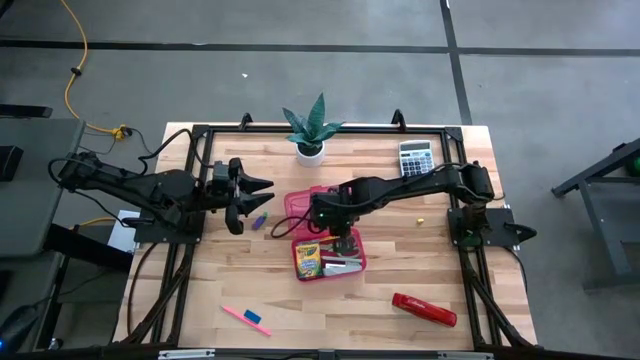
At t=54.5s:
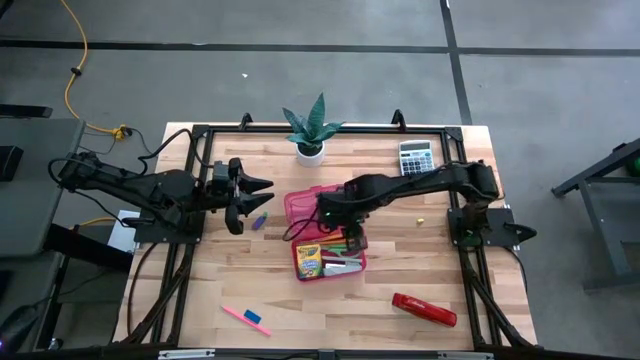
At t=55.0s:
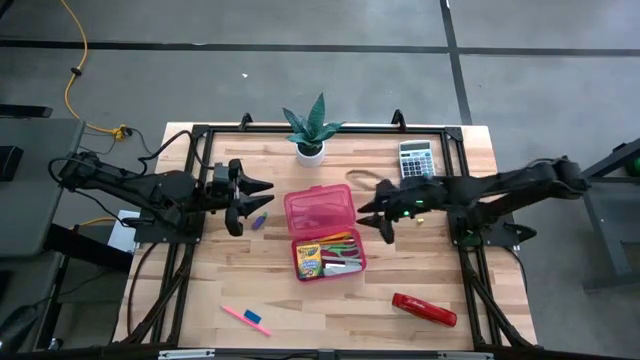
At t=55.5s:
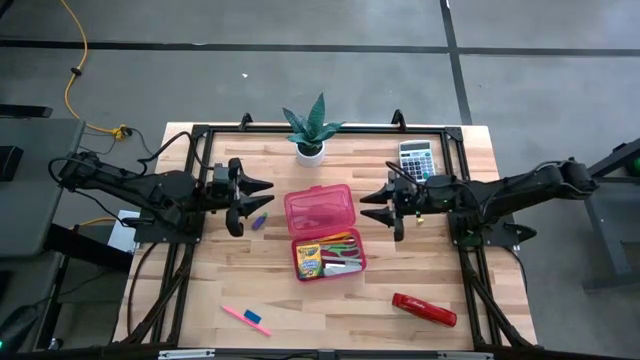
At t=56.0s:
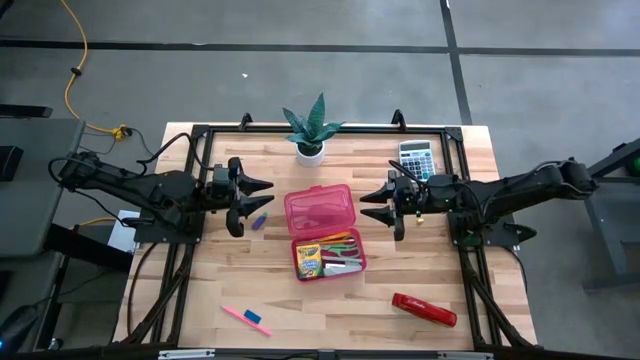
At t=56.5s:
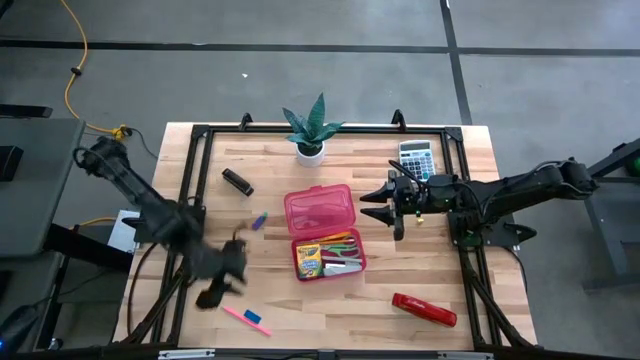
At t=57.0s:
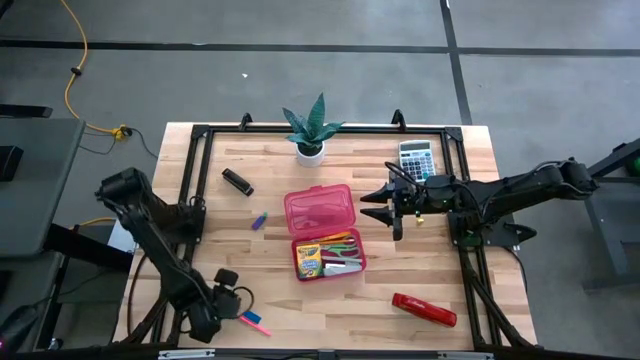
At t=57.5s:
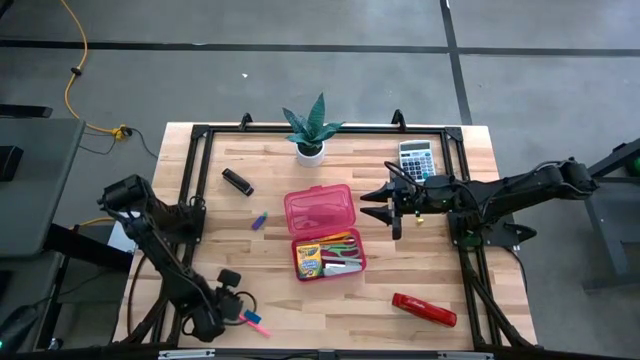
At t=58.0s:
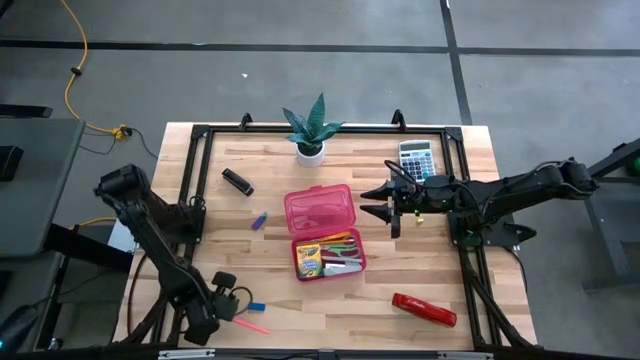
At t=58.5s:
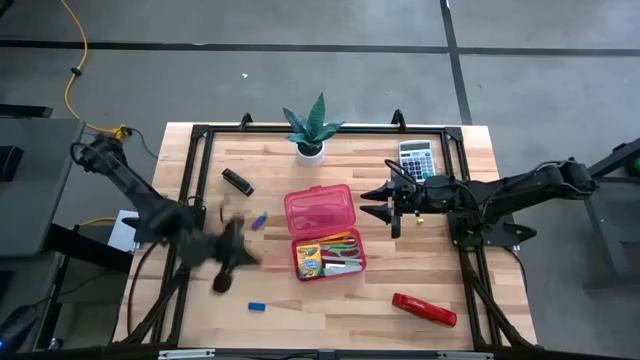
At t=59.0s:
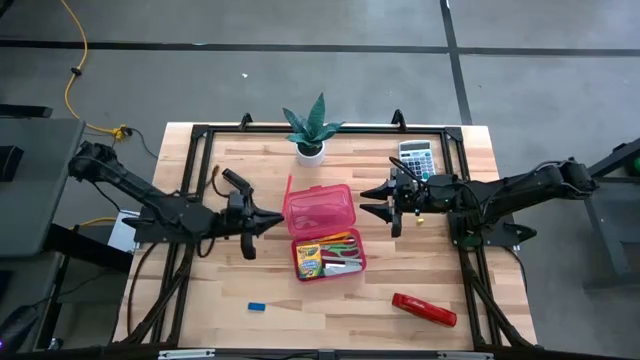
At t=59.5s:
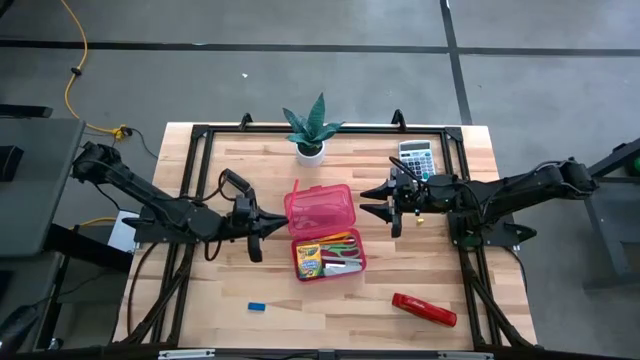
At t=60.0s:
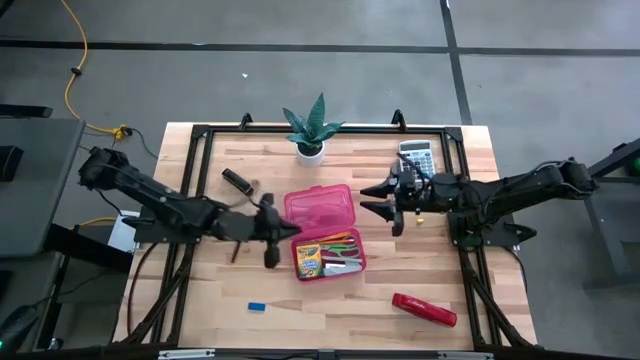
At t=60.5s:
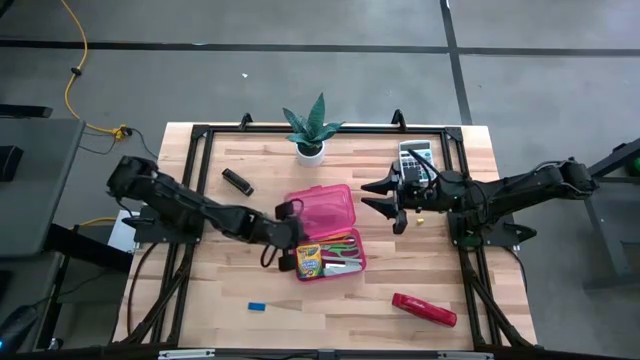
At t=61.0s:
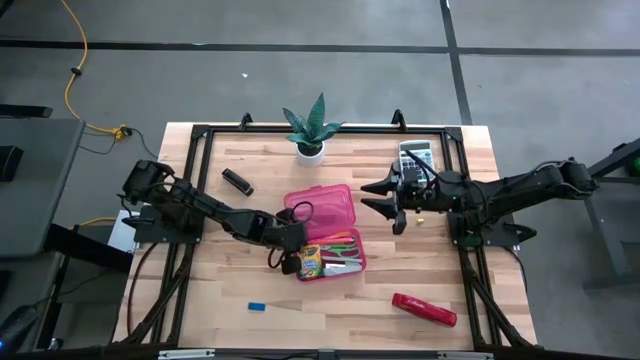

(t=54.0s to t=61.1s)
Task: Pack school essentials
Put the pink pencil into the red supply box

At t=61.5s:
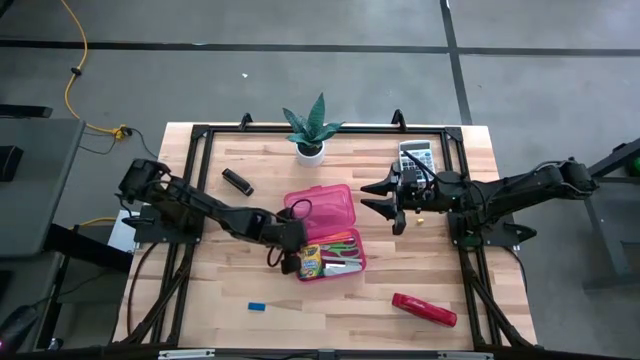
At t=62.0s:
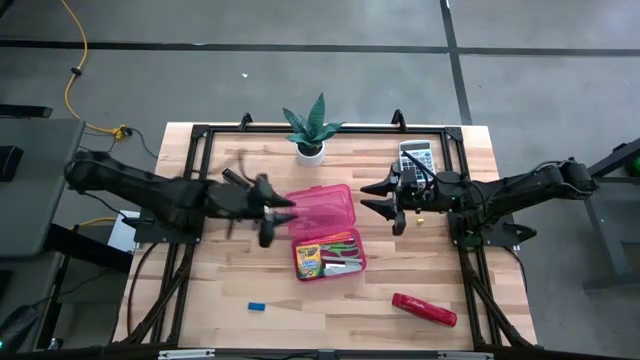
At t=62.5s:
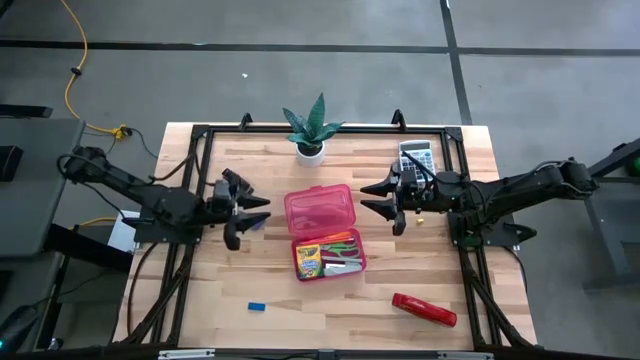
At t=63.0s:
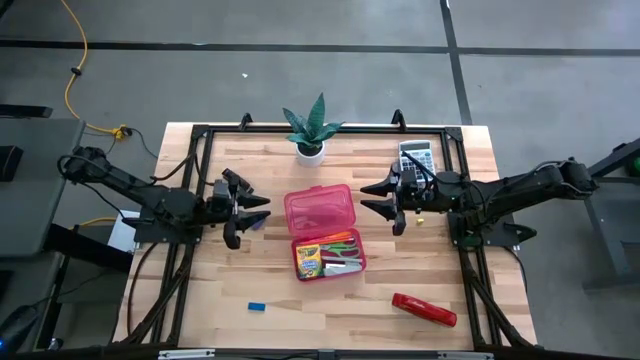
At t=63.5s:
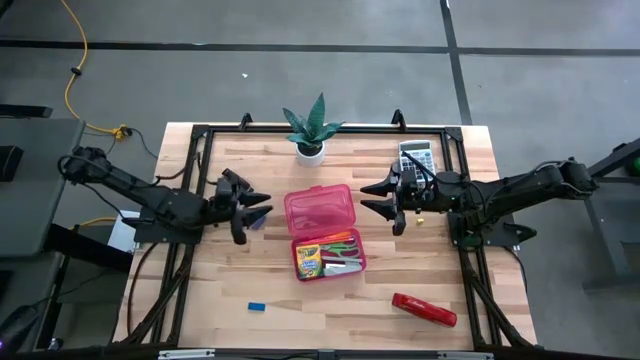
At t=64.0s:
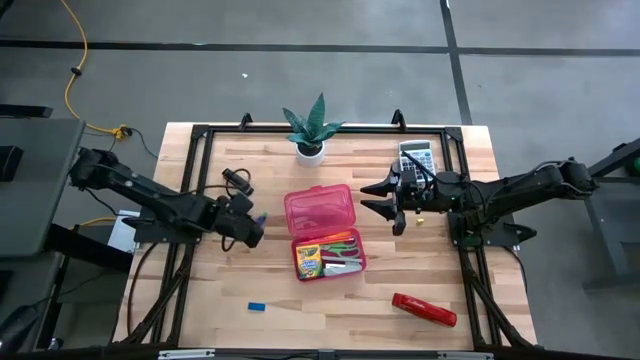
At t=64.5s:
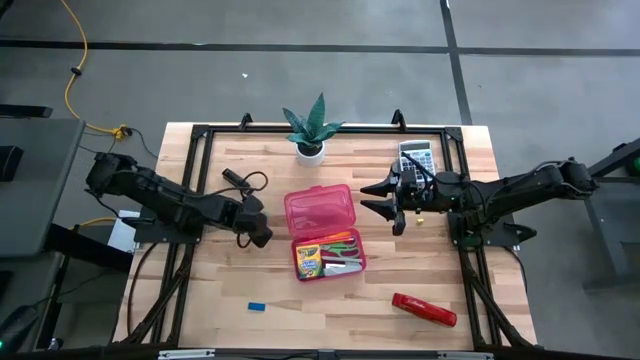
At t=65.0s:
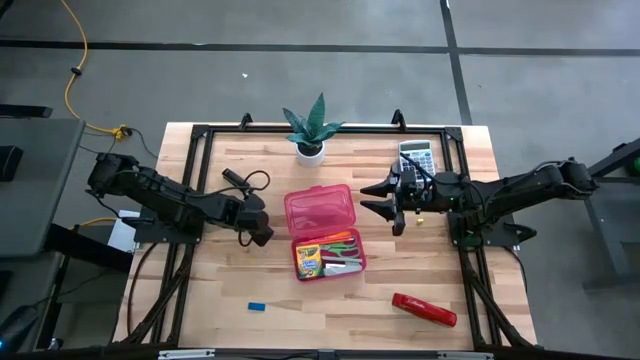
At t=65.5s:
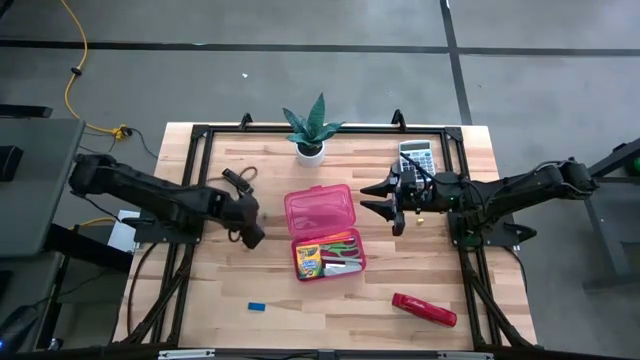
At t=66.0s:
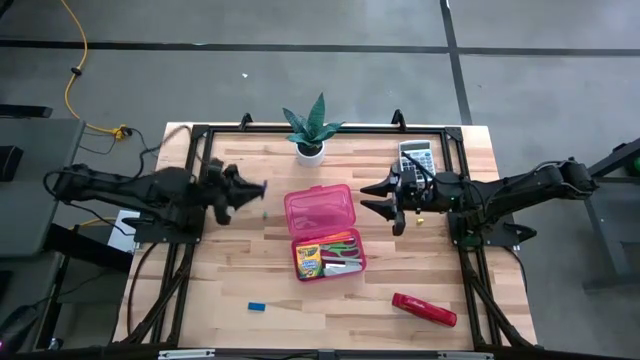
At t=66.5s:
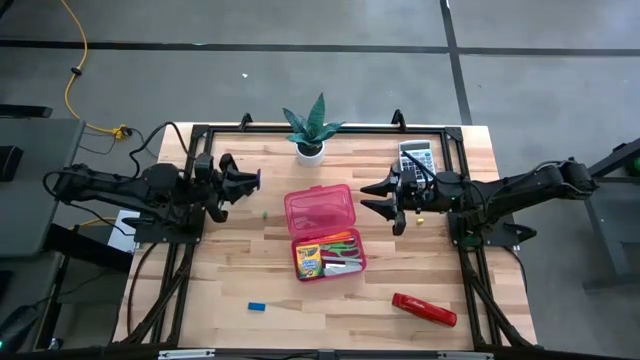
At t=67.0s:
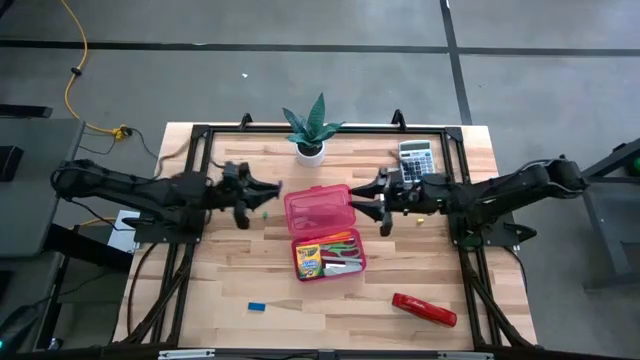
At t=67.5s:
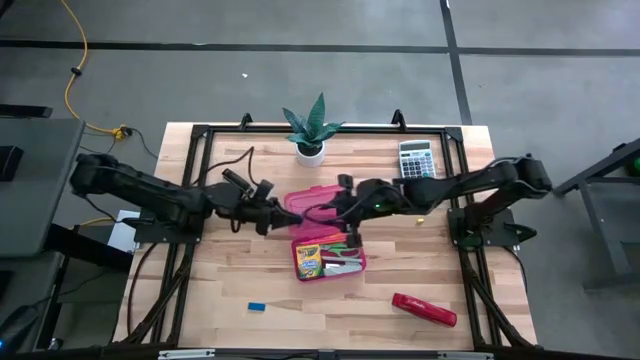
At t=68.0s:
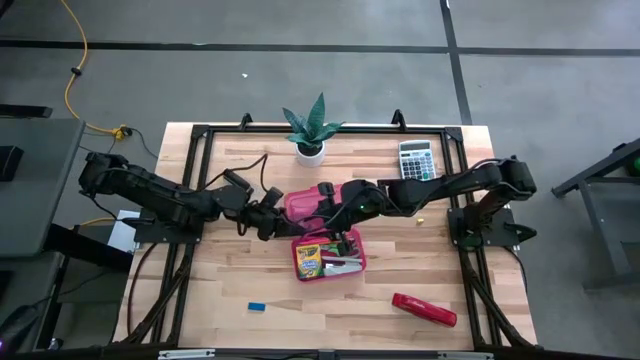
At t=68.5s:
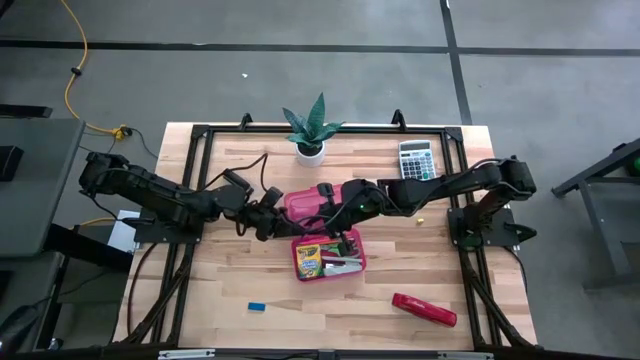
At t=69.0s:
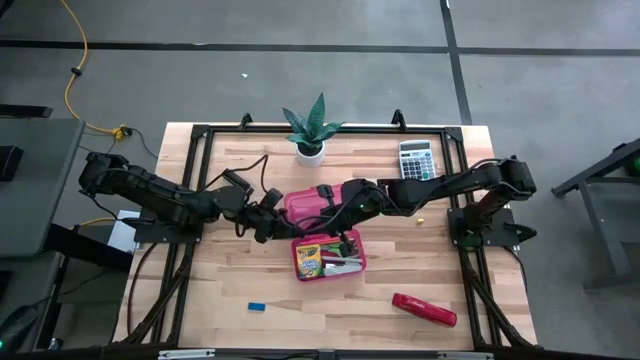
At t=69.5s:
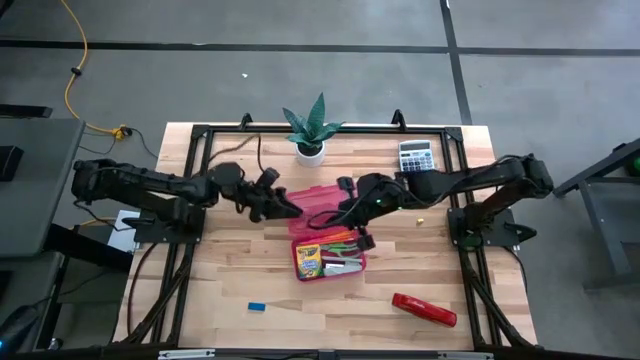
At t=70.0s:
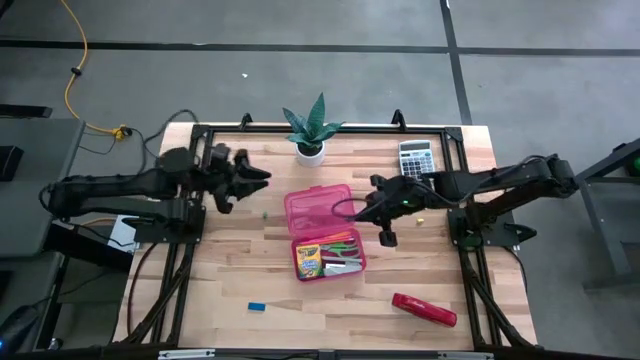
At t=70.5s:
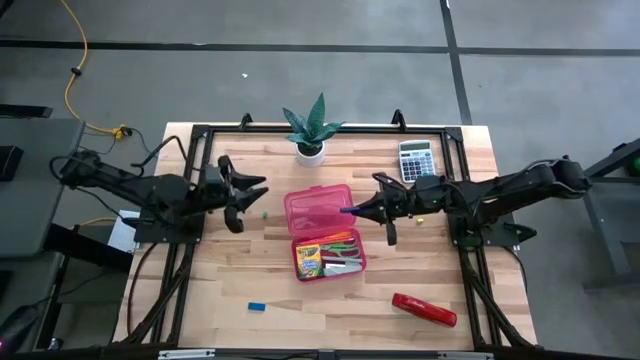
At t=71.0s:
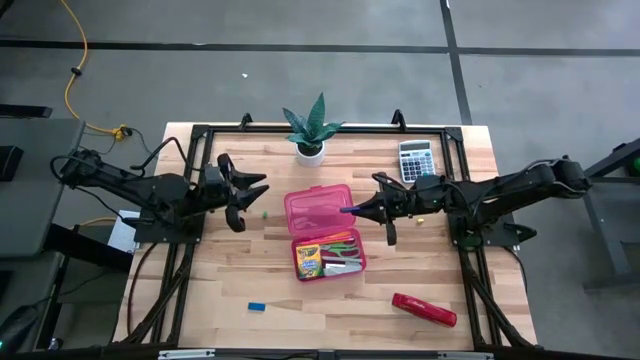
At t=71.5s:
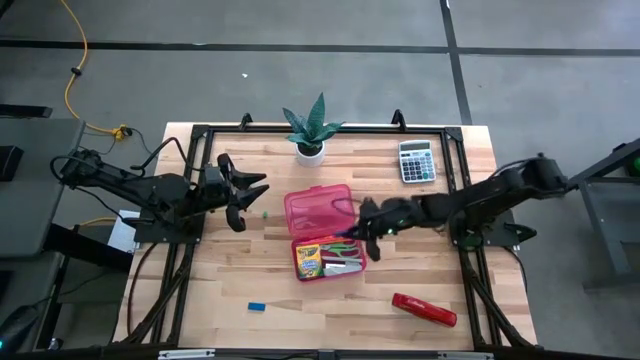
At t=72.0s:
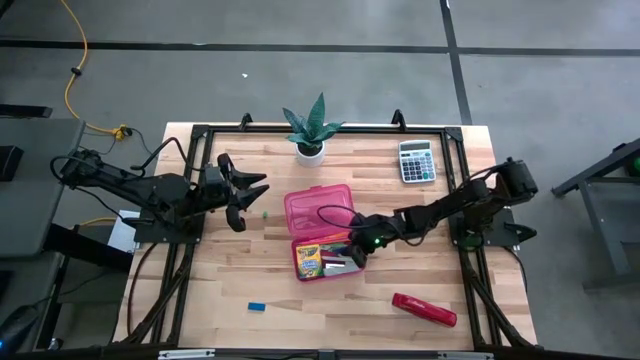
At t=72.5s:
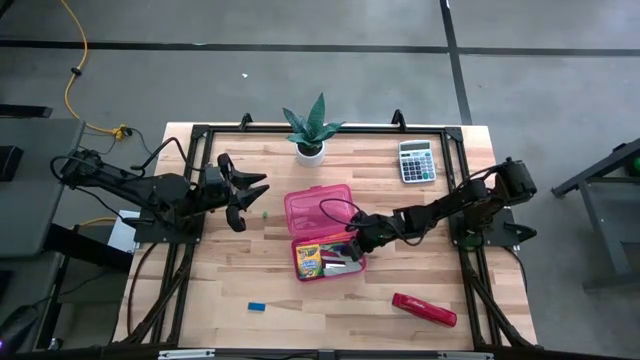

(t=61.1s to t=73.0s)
Put the violet eraser into the red supply box

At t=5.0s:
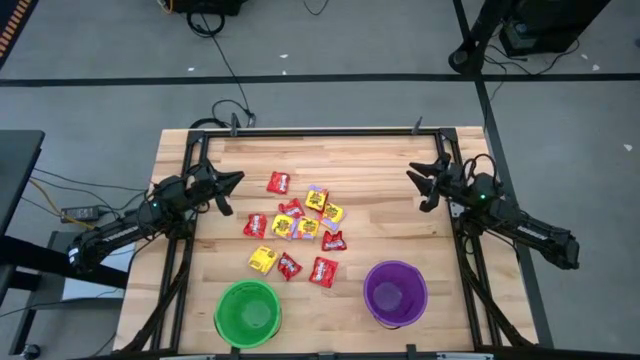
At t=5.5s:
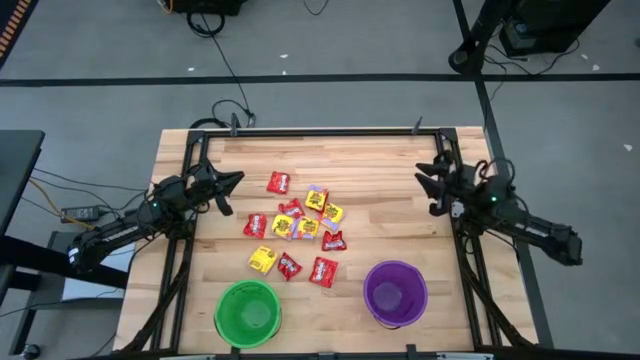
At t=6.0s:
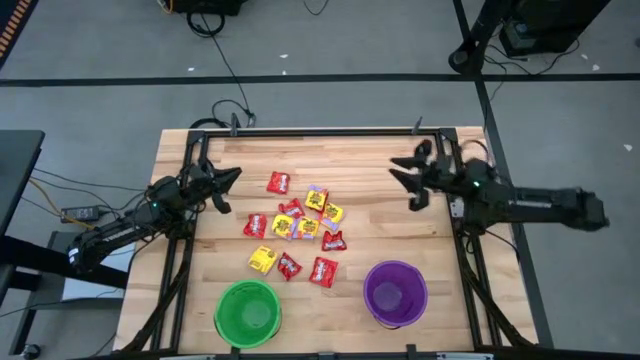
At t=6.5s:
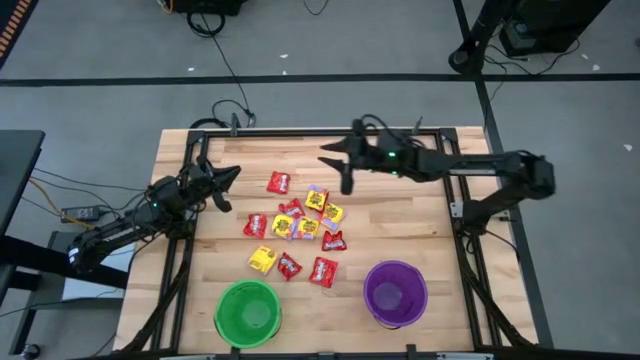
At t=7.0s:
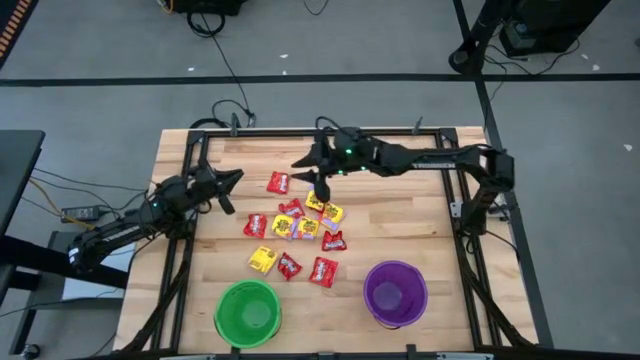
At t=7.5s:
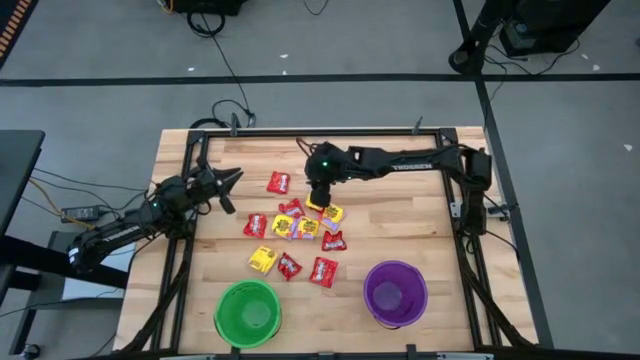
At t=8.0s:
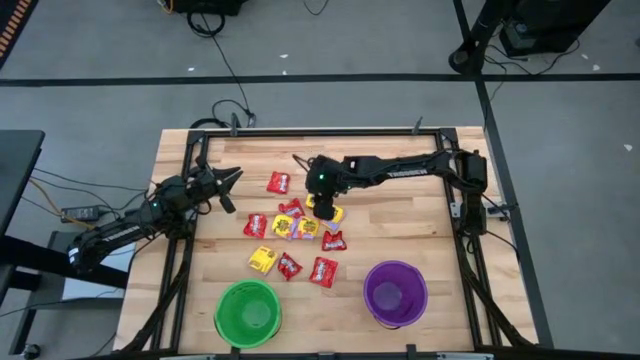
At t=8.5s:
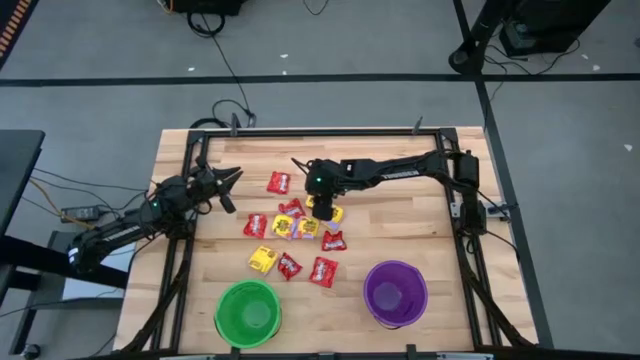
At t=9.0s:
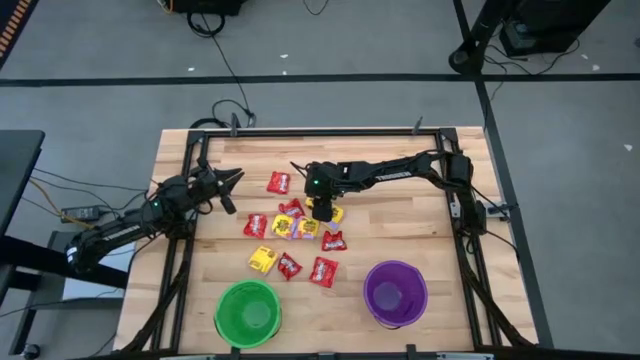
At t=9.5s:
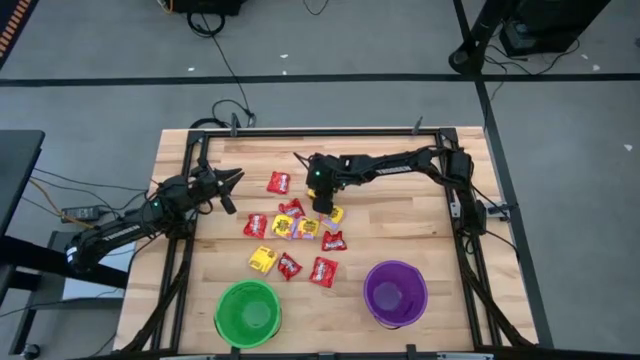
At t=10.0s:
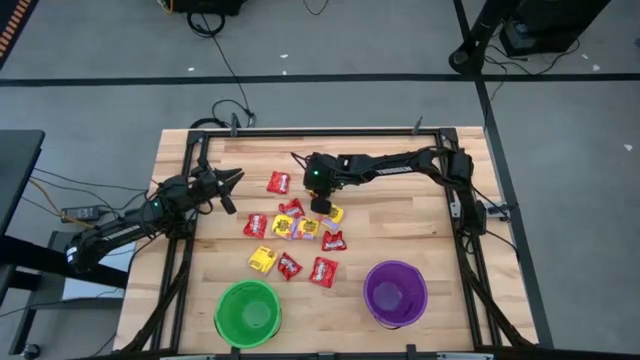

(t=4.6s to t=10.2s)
Task: Sort candy by brand, put in halloween buckets
Put the yellow candy into the purple bucket
